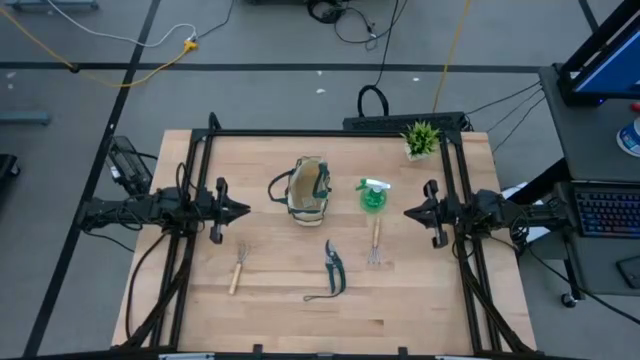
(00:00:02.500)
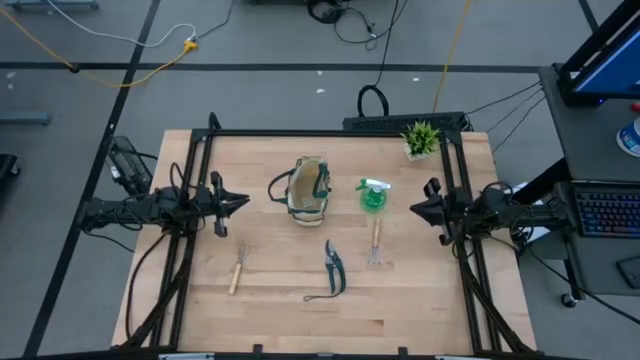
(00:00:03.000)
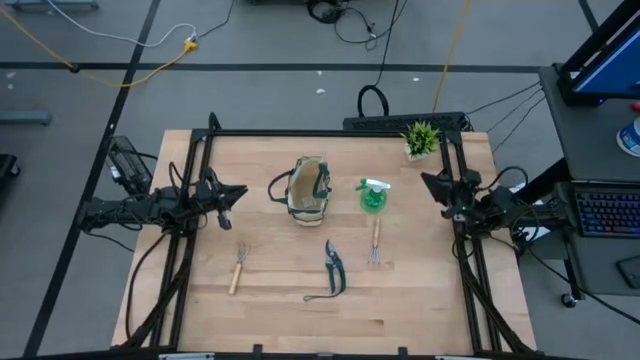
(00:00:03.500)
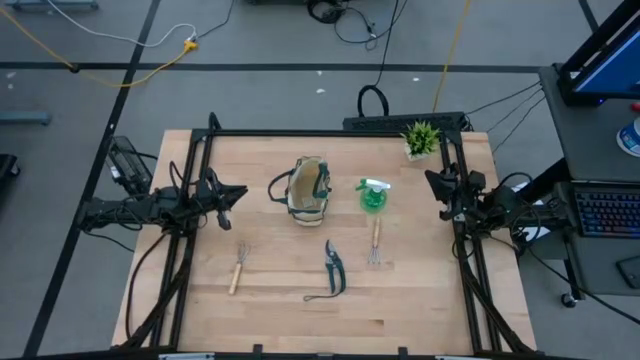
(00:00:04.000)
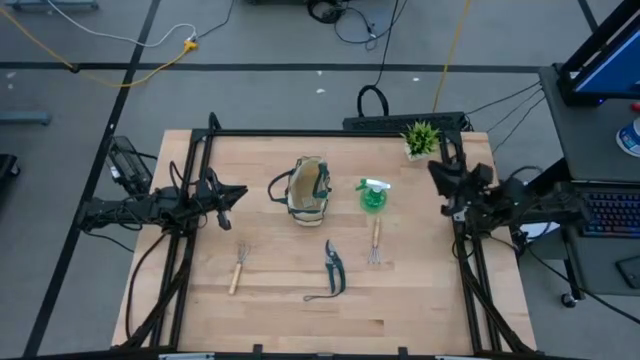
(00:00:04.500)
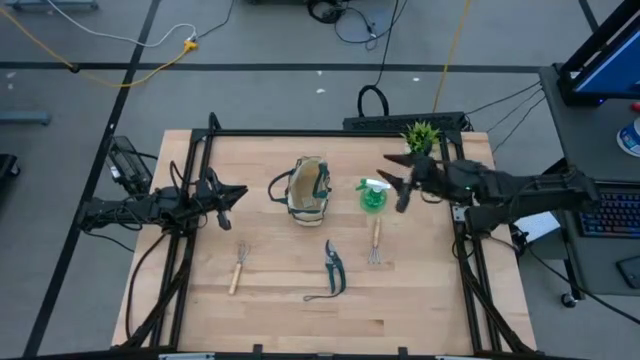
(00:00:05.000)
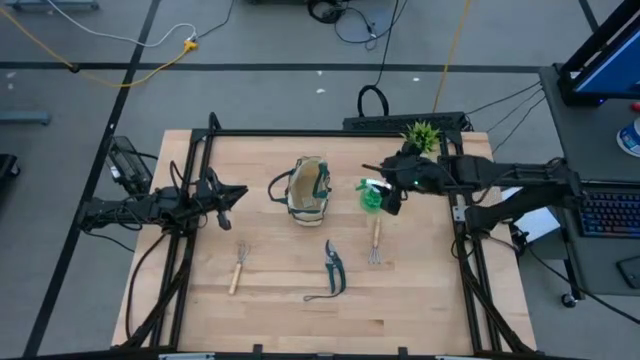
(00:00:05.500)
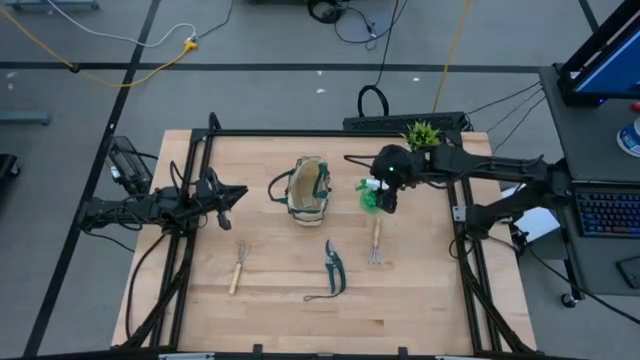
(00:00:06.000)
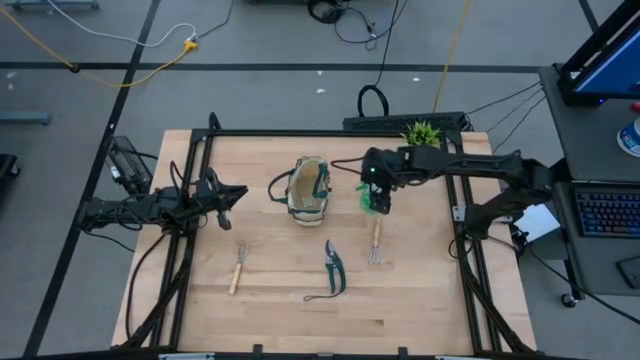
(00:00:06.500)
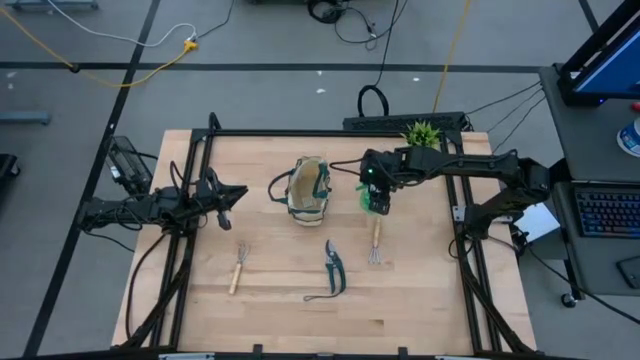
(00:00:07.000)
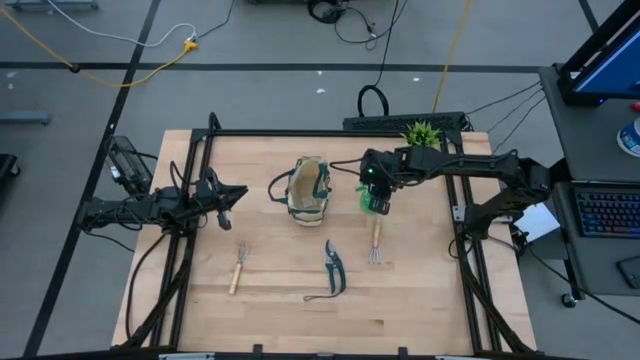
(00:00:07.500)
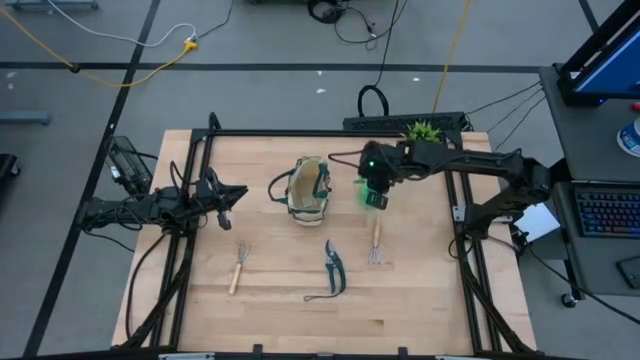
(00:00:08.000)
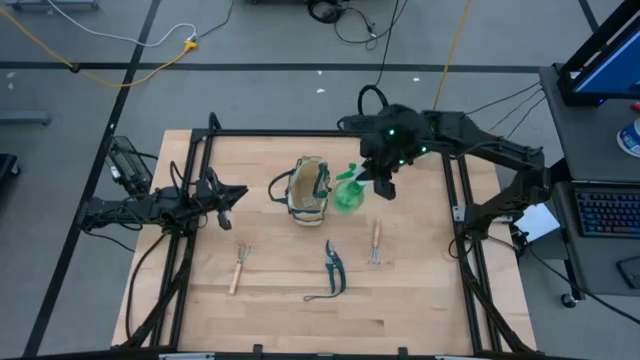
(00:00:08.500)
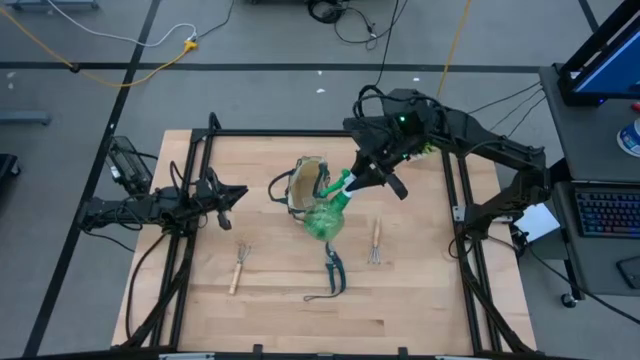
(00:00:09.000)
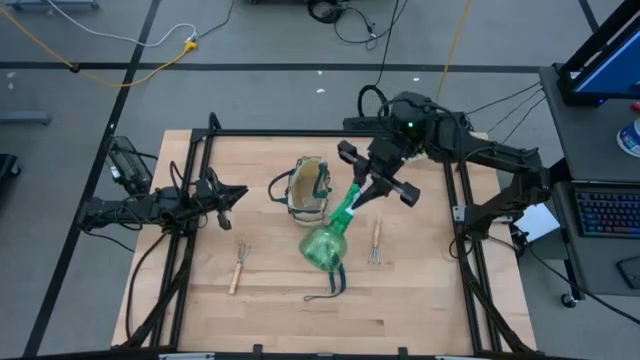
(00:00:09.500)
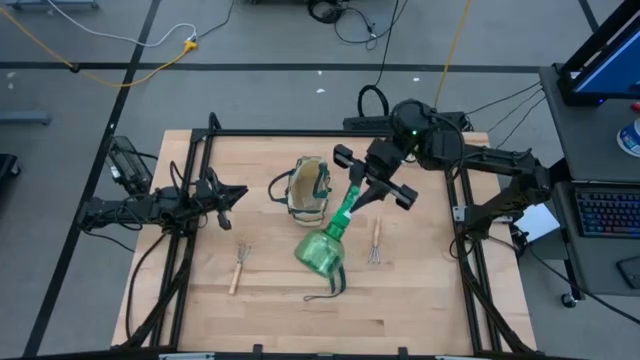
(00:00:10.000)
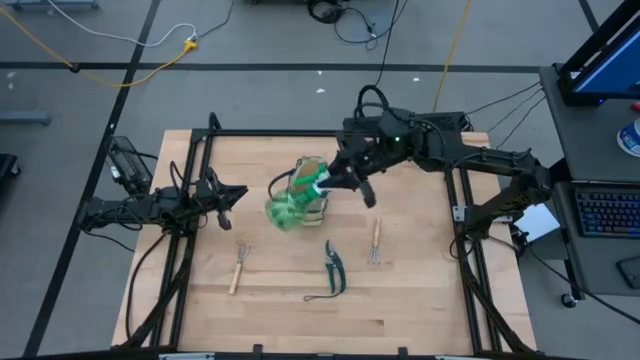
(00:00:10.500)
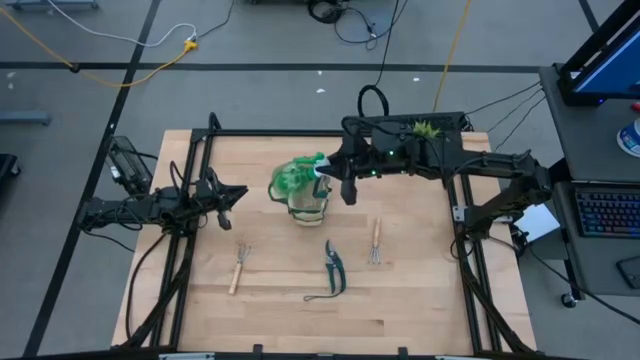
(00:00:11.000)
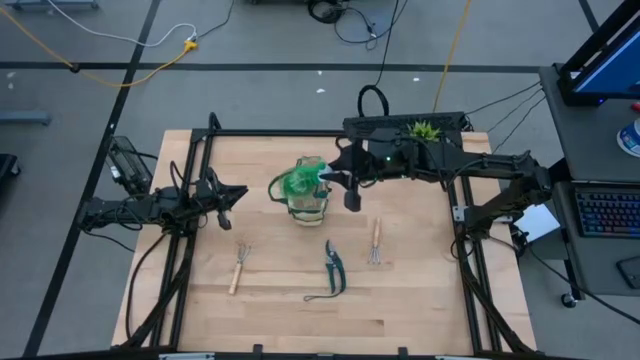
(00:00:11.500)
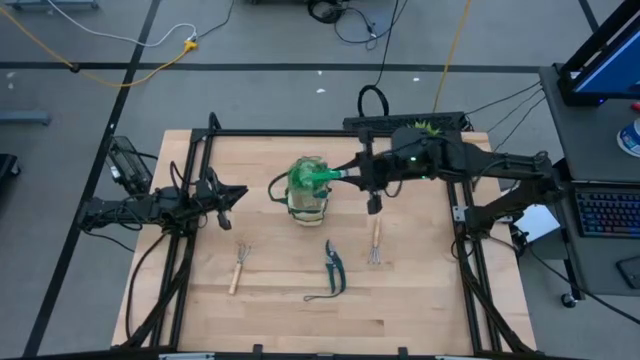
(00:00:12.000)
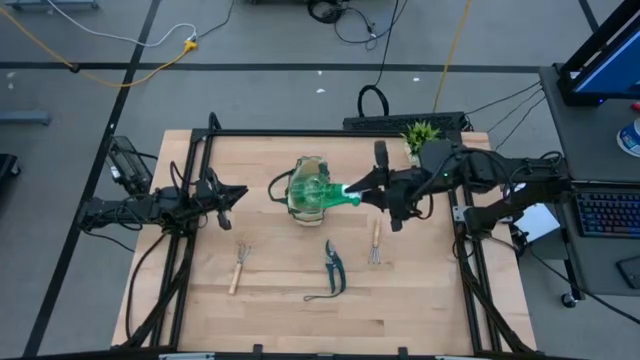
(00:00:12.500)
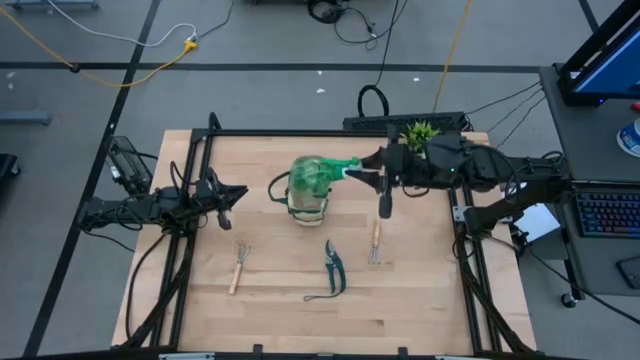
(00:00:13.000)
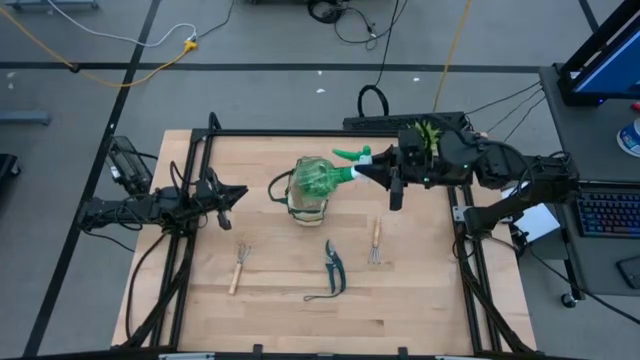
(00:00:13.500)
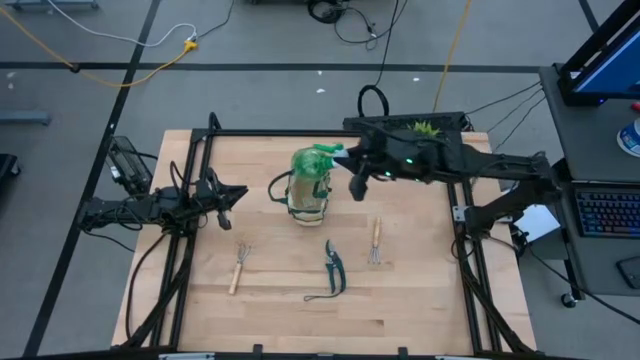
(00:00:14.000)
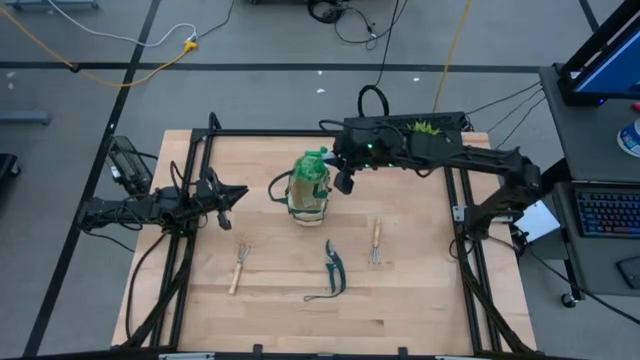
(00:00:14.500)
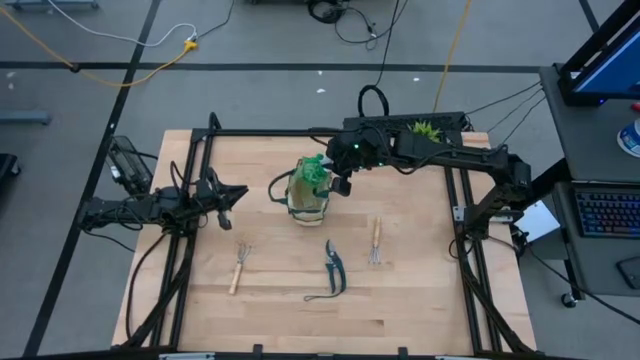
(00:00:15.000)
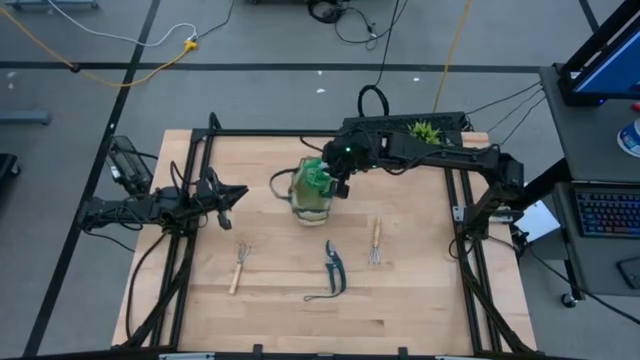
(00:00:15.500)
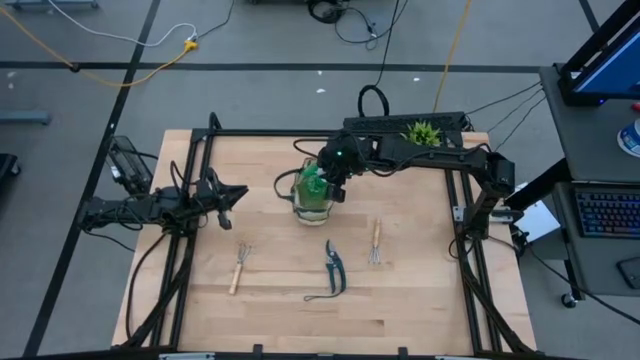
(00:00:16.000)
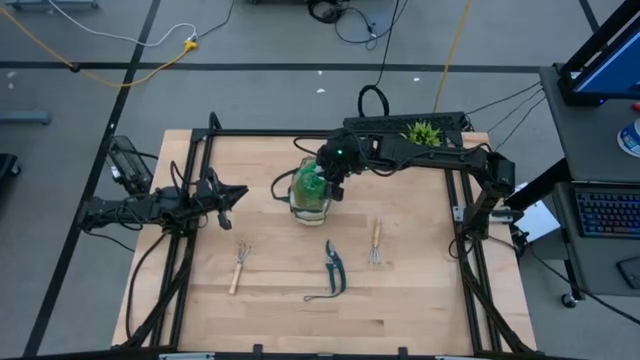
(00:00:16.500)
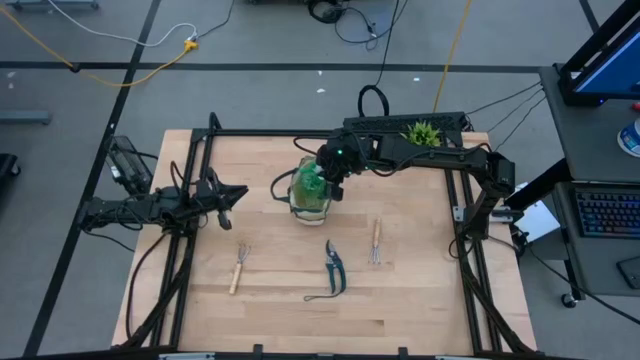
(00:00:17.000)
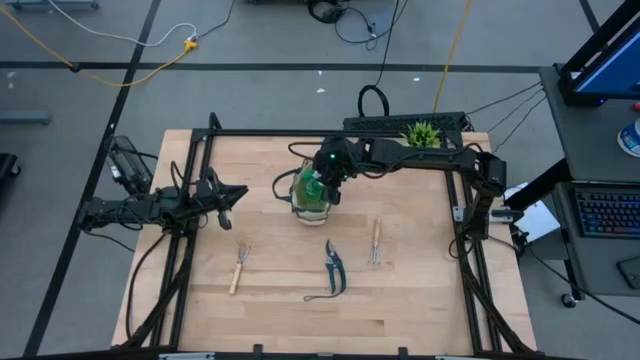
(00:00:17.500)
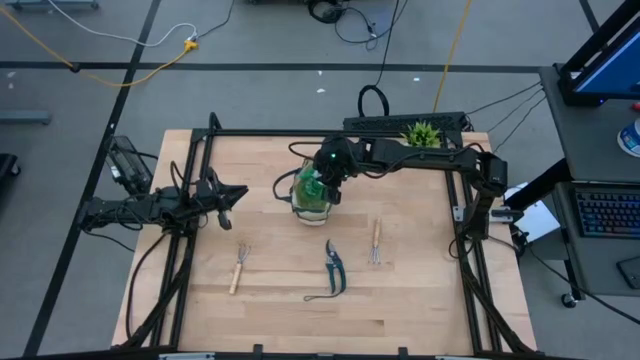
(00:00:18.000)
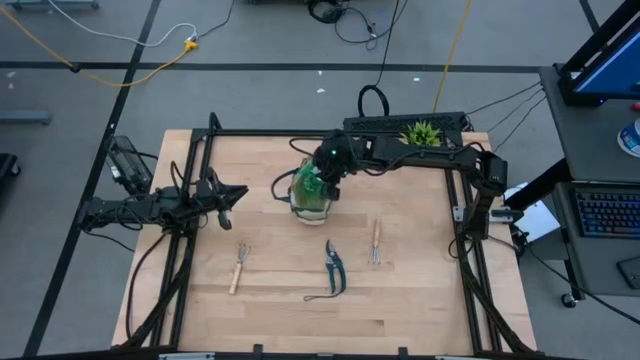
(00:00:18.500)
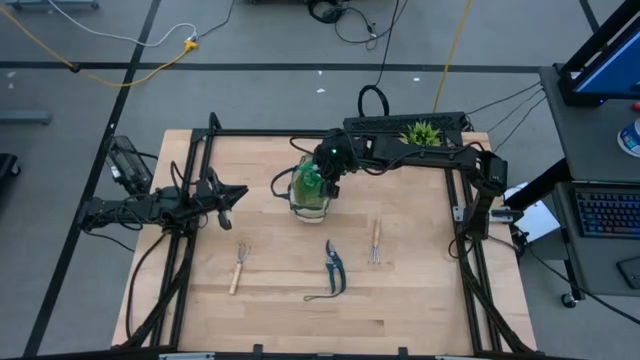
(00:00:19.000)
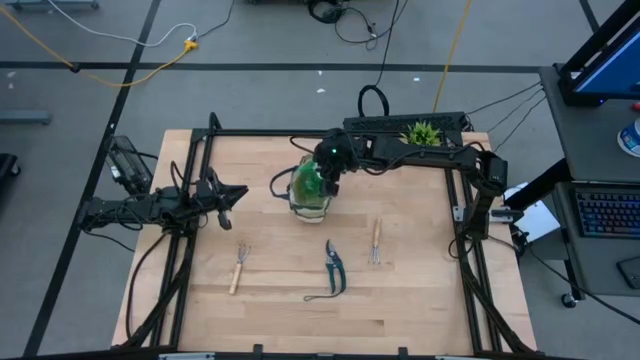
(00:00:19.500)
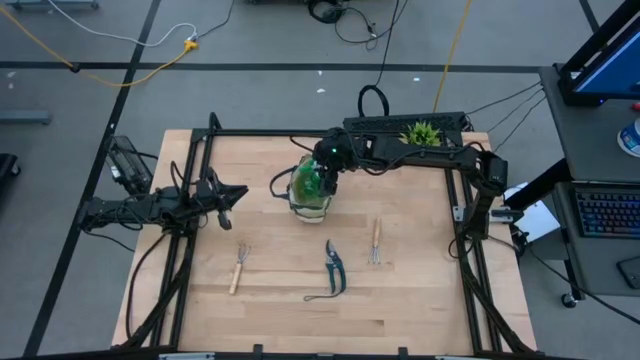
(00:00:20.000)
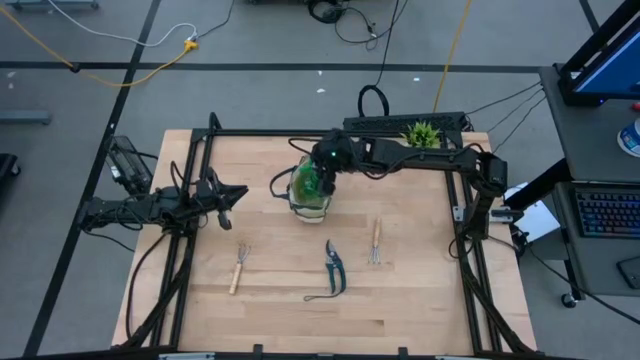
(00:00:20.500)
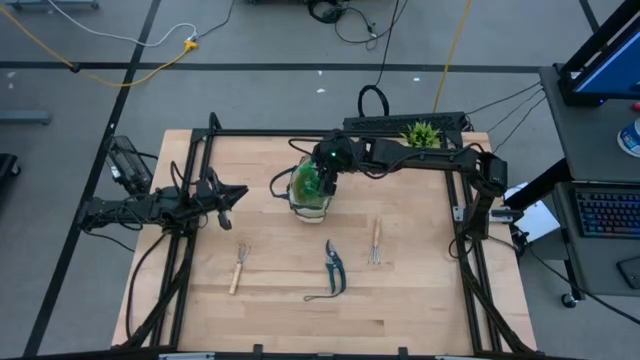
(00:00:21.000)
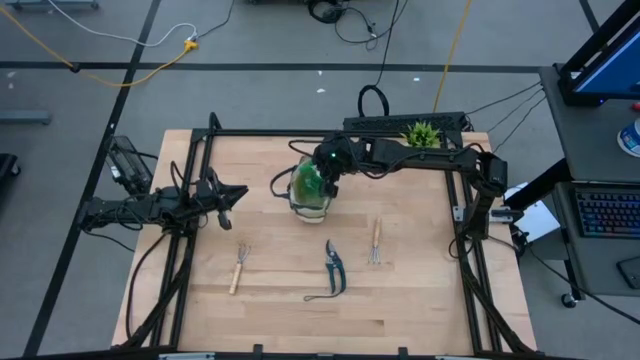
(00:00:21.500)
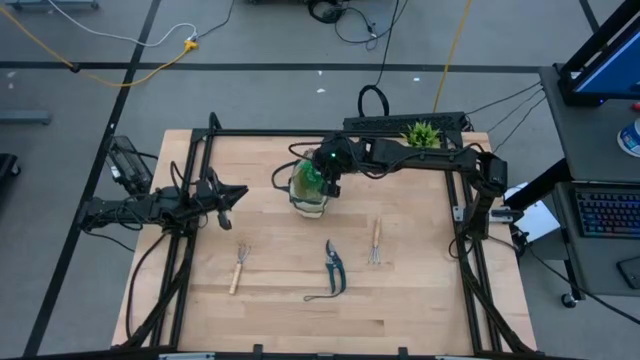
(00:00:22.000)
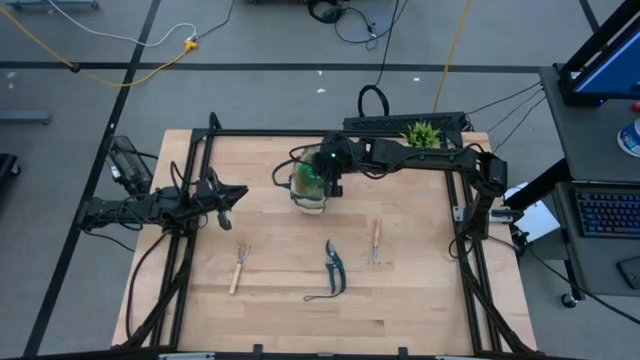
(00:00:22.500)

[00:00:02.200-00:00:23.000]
Task: Pick & Place Garden tools in Gardening bag
Put the green spray bottle into the top gardening bag
